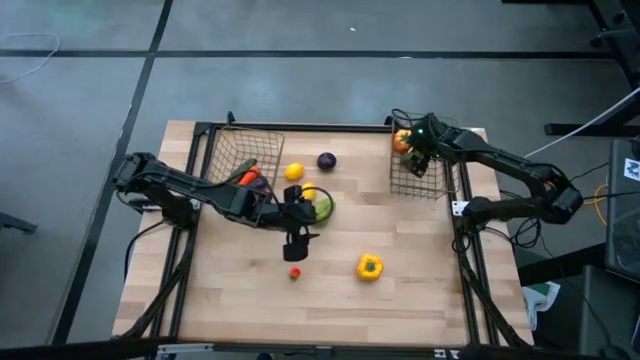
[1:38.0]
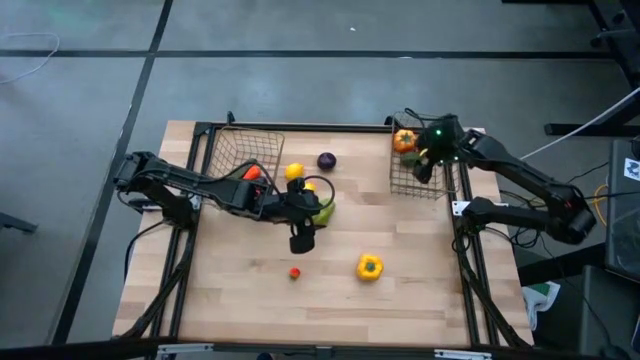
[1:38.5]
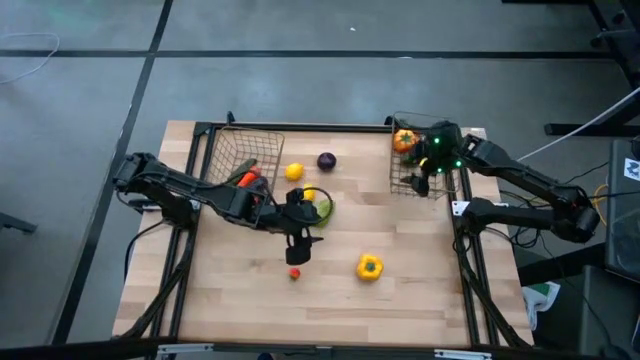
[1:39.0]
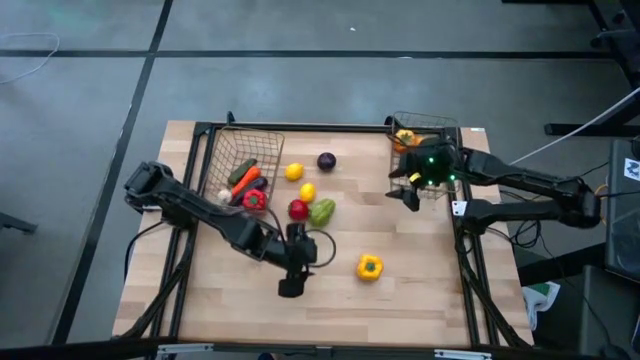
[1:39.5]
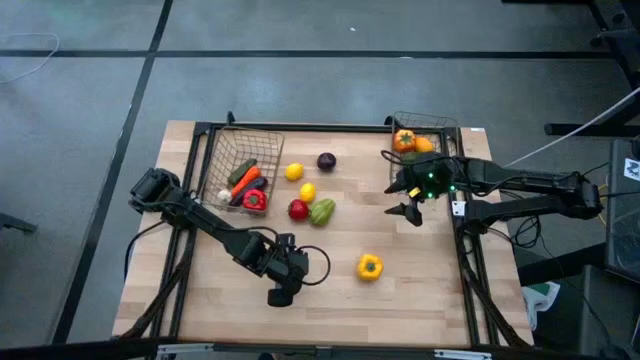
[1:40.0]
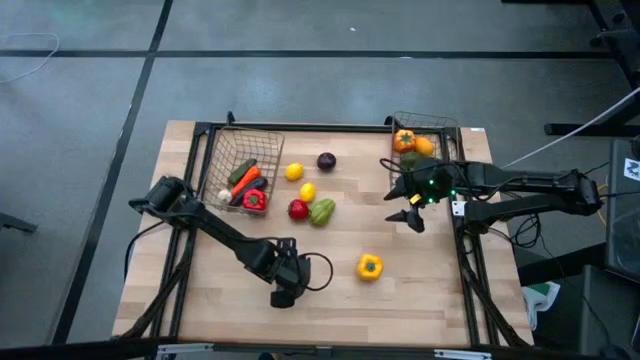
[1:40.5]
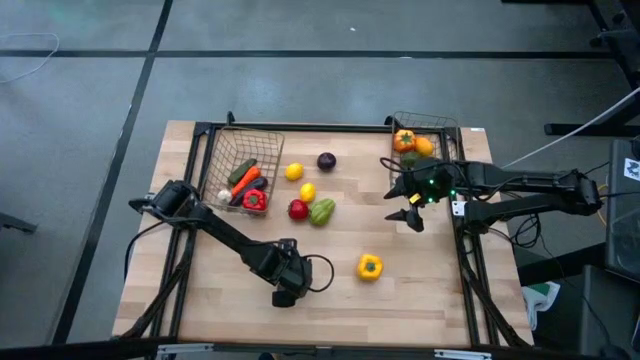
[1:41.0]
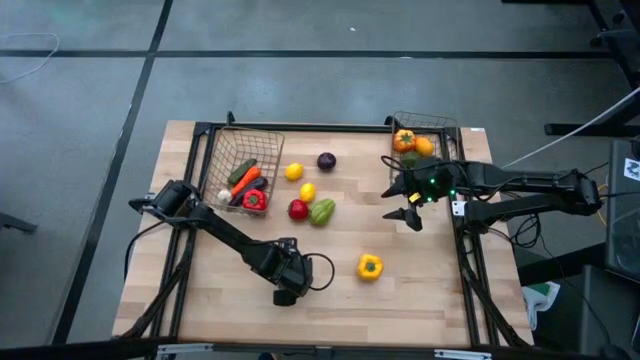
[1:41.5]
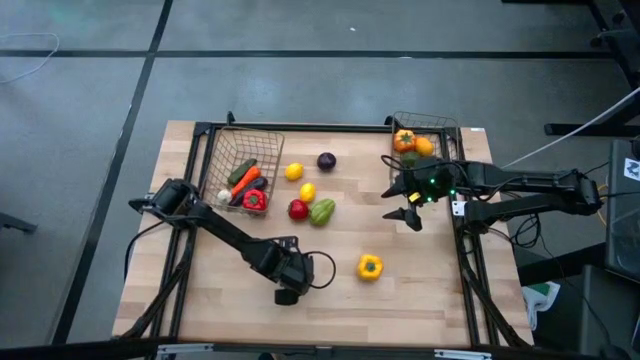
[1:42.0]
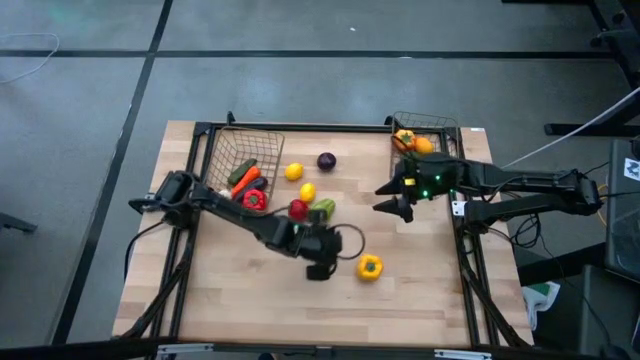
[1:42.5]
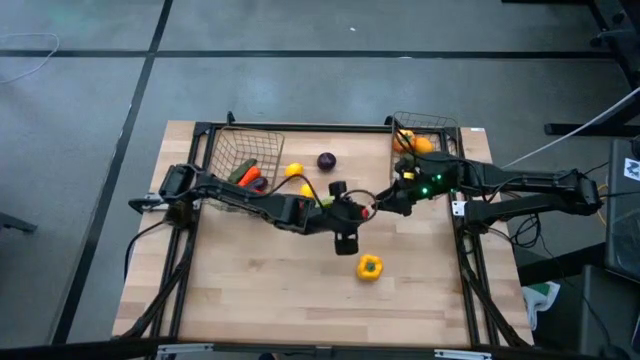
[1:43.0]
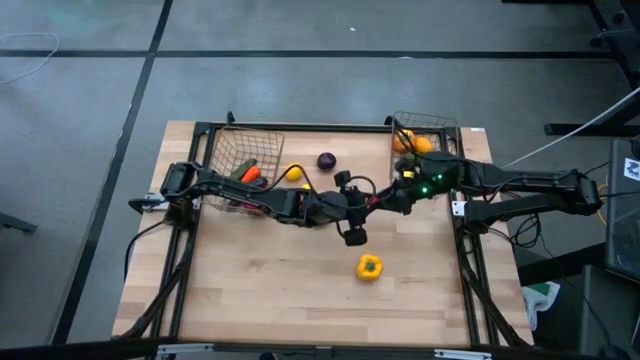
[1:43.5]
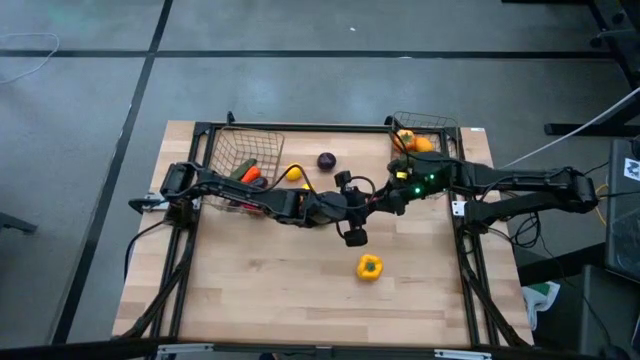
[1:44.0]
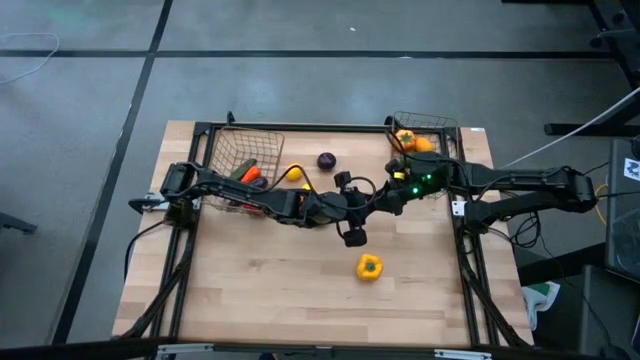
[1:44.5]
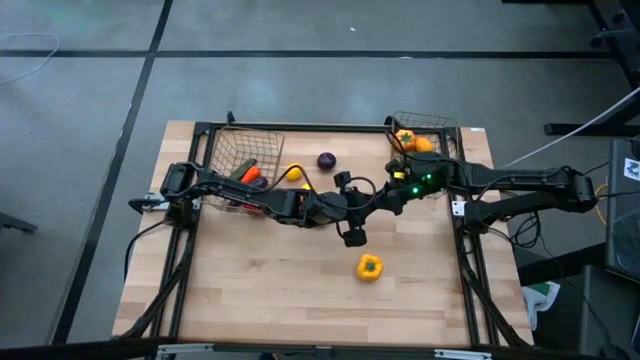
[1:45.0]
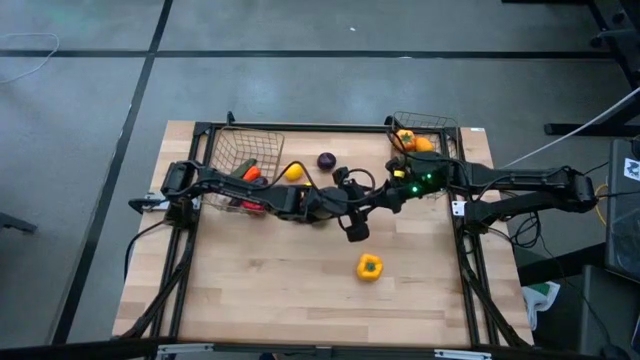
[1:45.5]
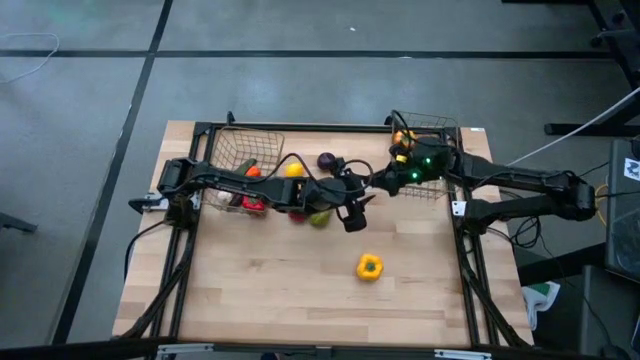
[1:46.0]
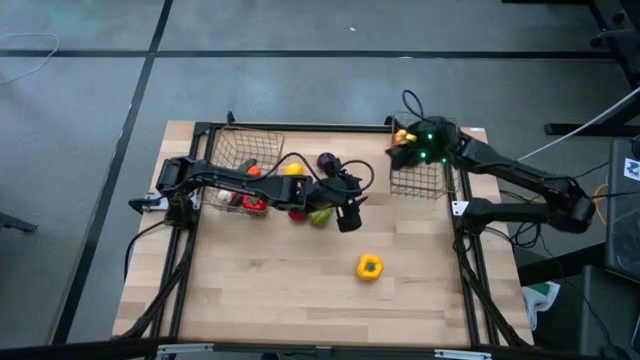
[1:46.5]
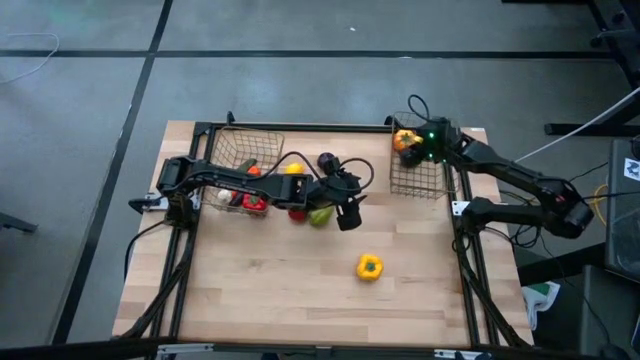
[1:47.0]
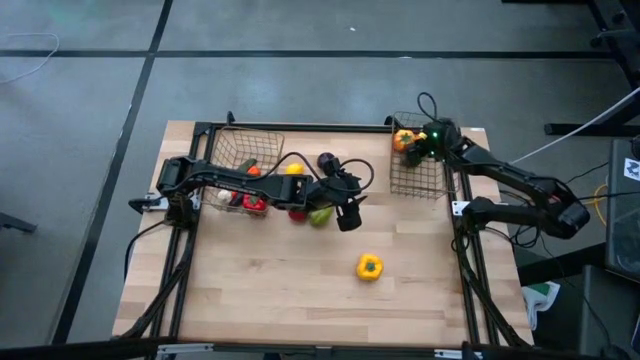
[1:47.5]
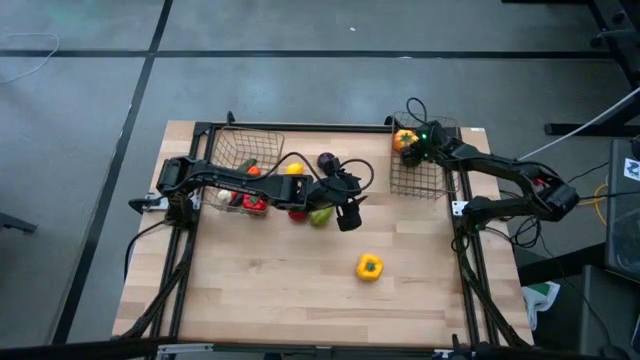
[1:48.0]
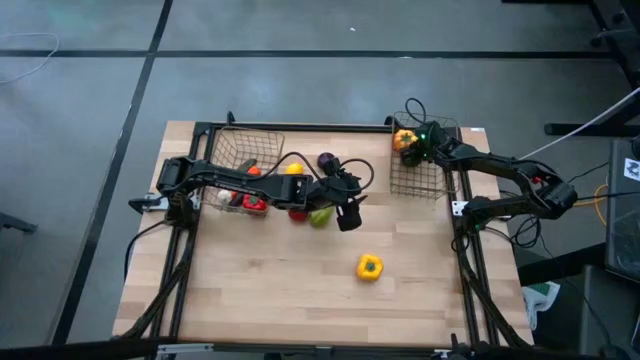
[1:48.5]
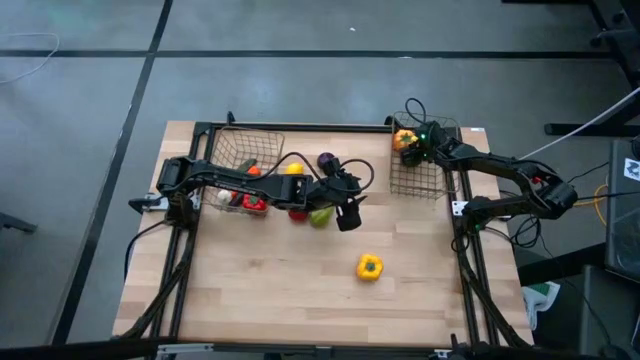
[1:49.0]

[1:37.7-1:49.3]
Task: Sort produce into baskets
Put the bottom red tomato into the right gold wire basket

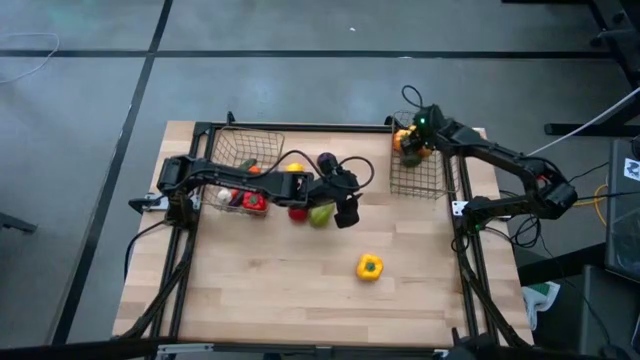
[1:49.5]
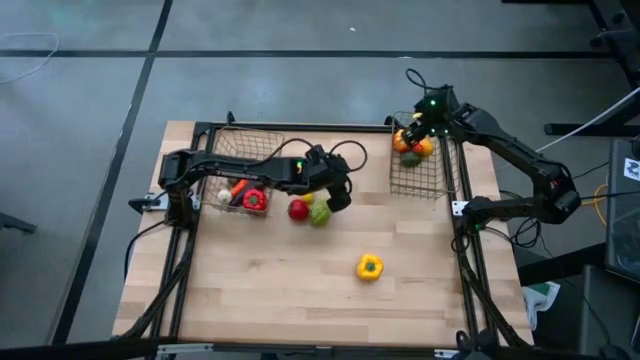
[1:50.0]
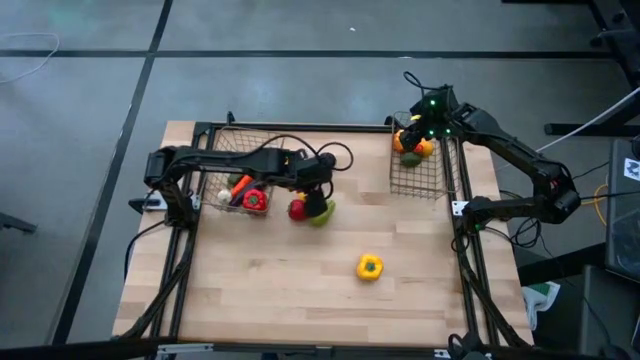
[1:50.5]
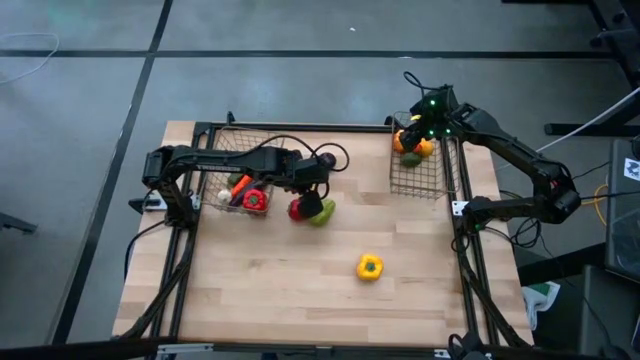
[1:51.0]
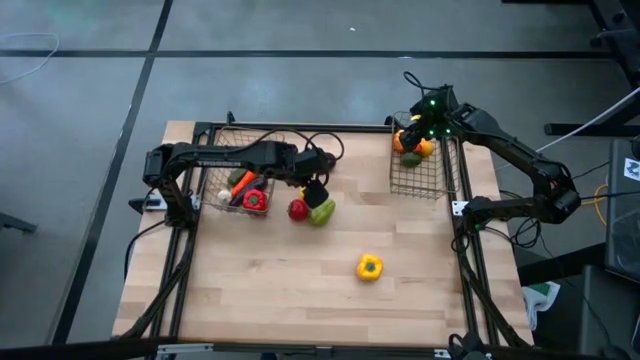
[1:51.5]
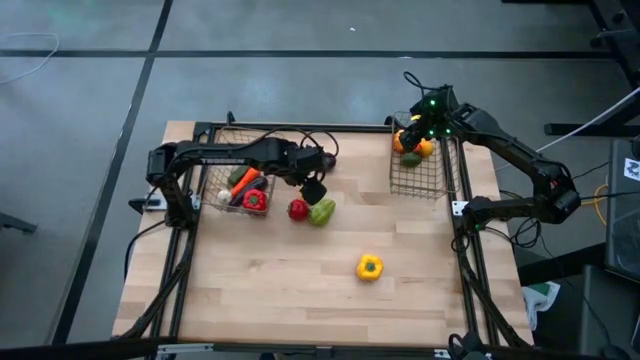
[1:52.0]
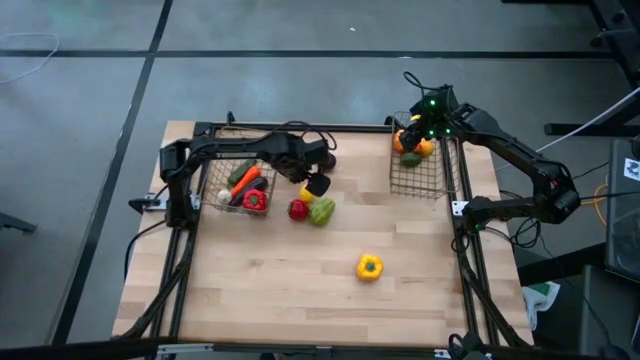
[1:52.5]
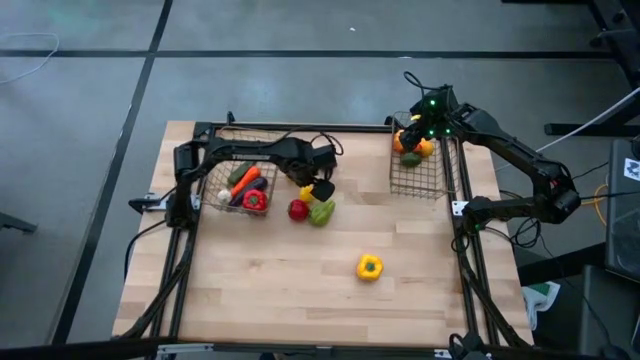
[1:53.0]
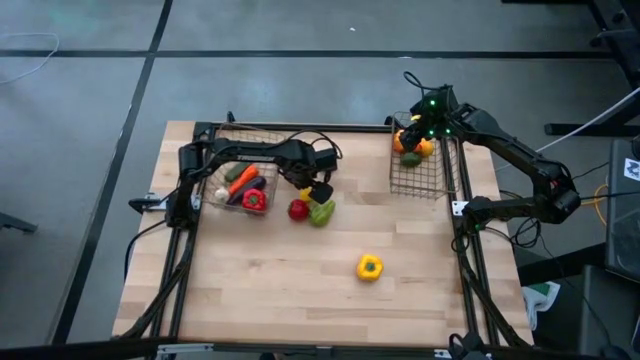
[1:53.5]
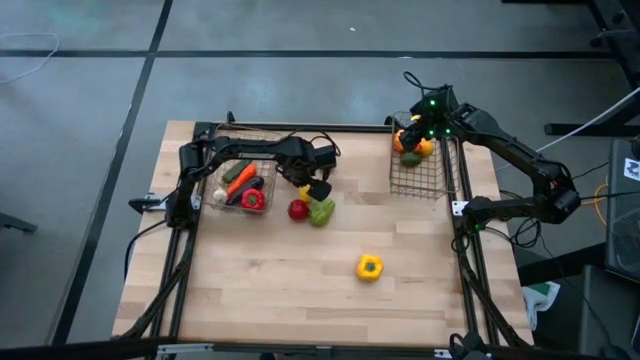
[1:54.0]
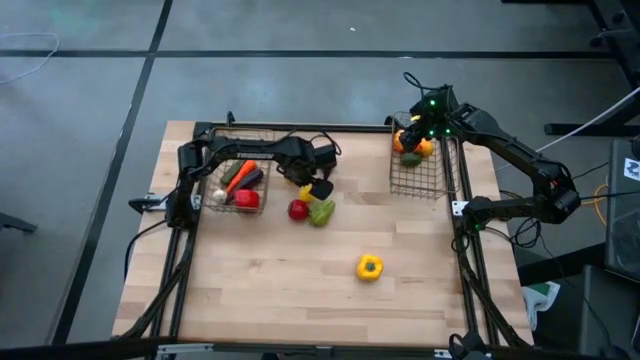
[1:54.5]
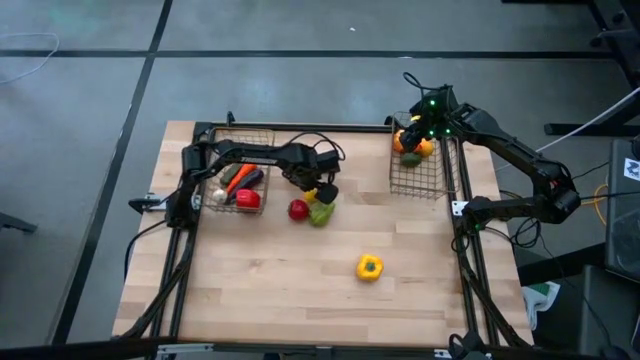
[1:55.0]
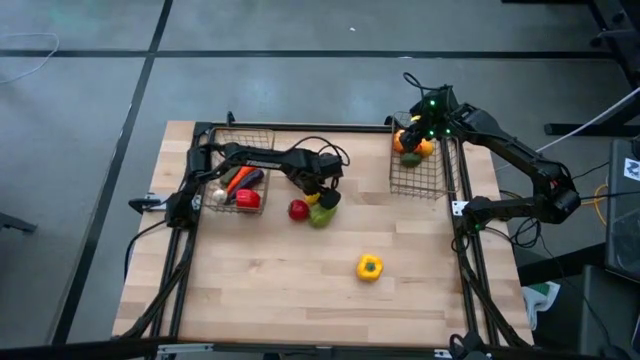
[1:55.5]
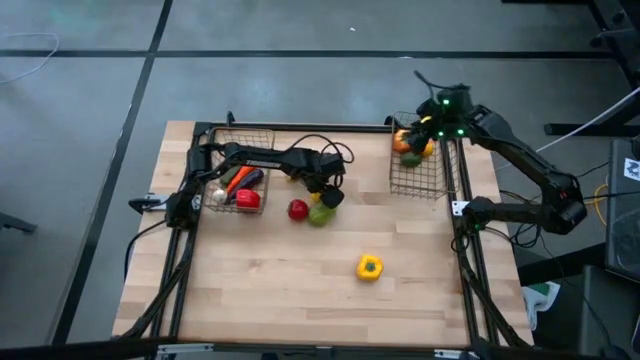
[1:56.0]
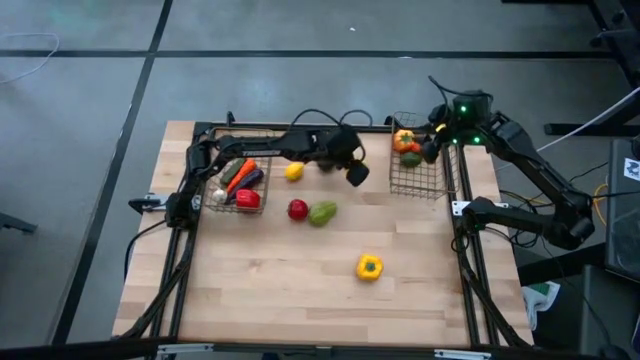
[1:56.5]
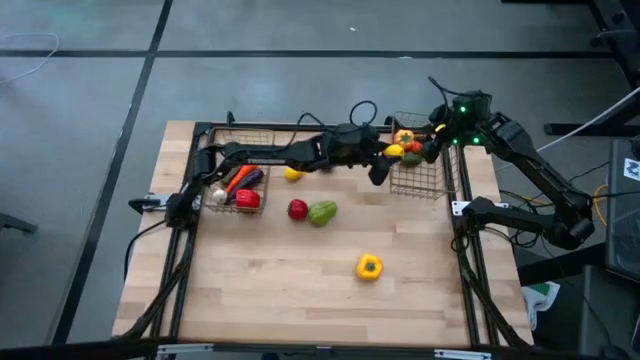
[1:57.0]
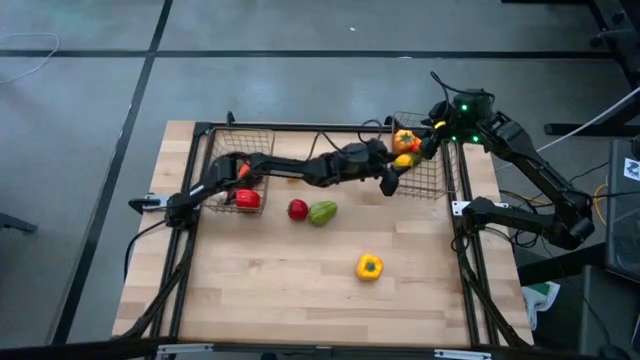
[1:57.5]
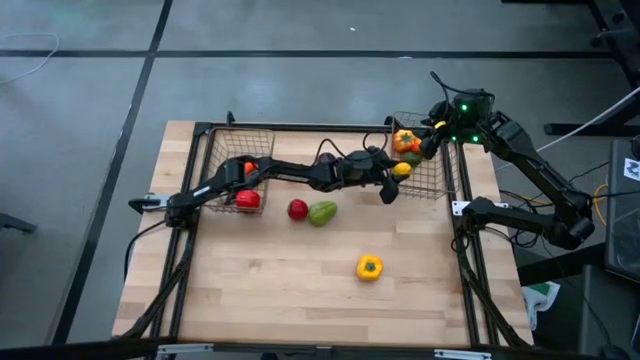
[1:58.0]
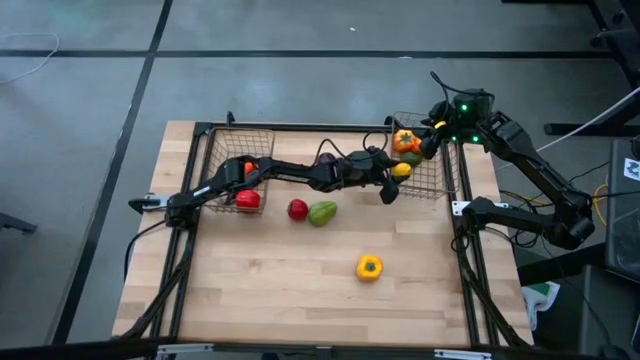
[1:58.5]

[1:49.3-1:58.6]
Put the bottom lemon into the right gold wire basket
